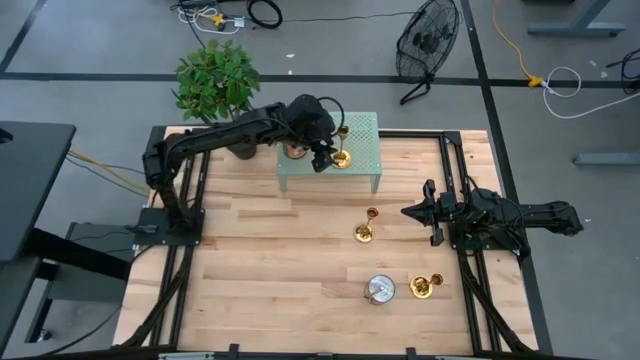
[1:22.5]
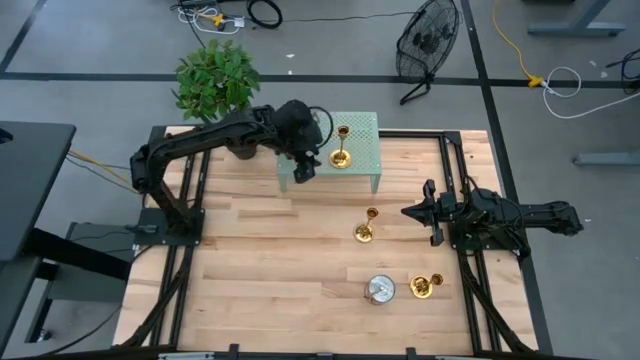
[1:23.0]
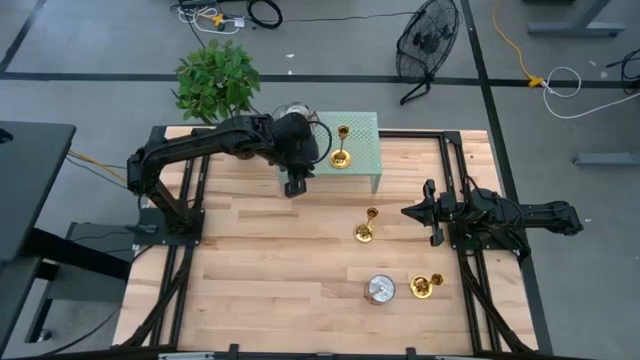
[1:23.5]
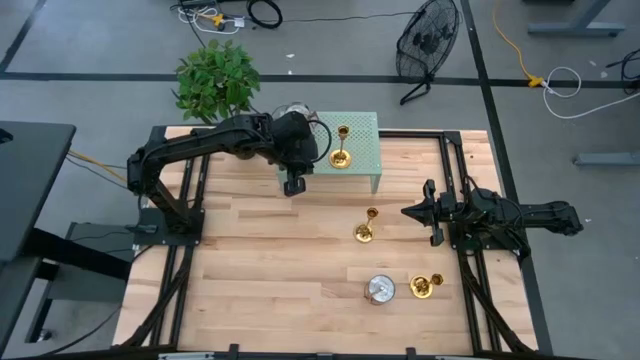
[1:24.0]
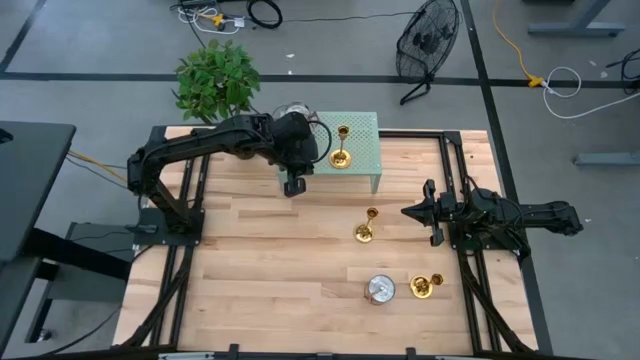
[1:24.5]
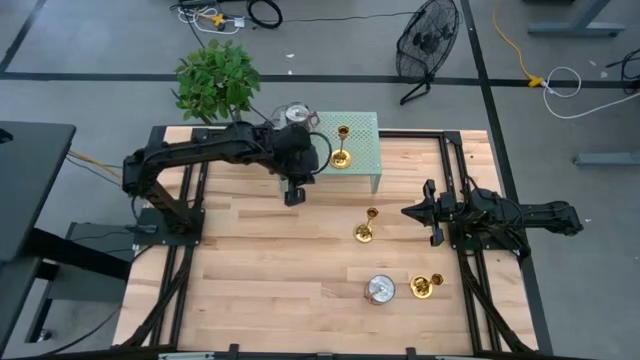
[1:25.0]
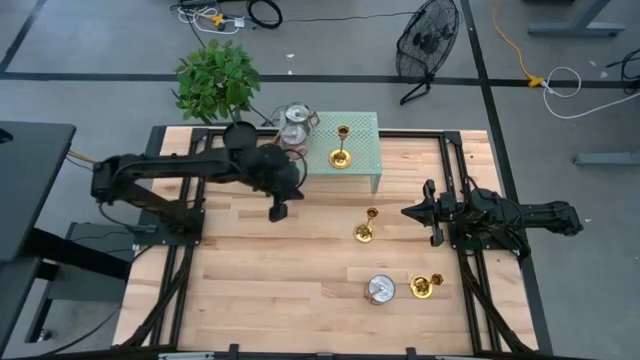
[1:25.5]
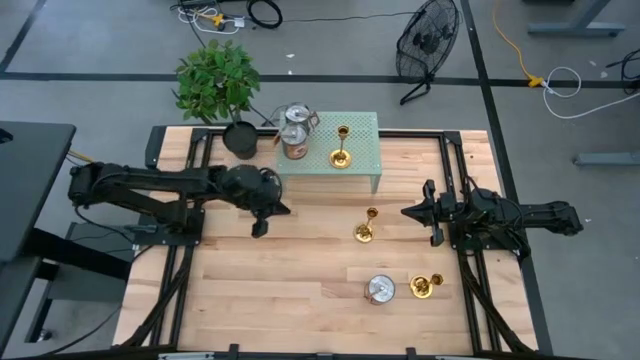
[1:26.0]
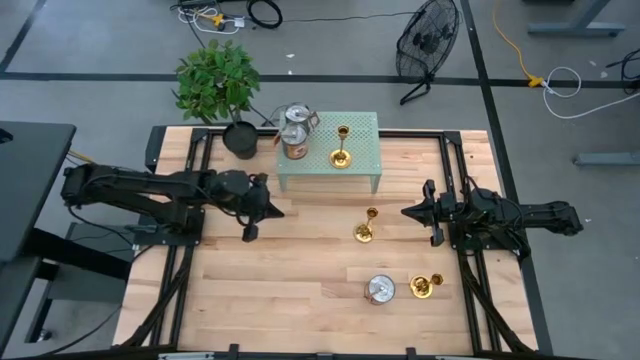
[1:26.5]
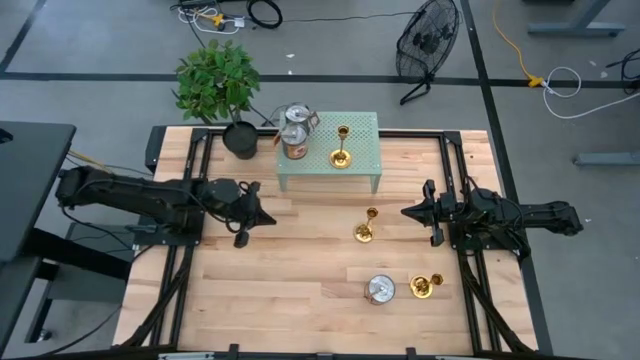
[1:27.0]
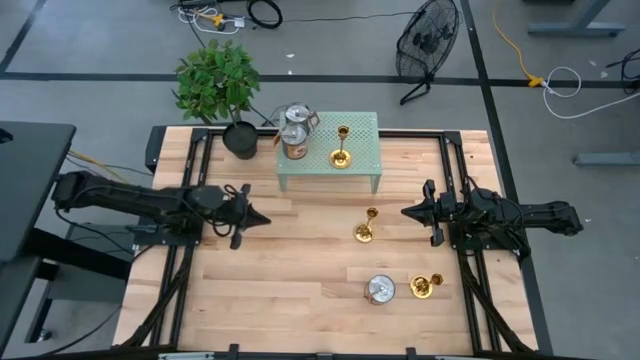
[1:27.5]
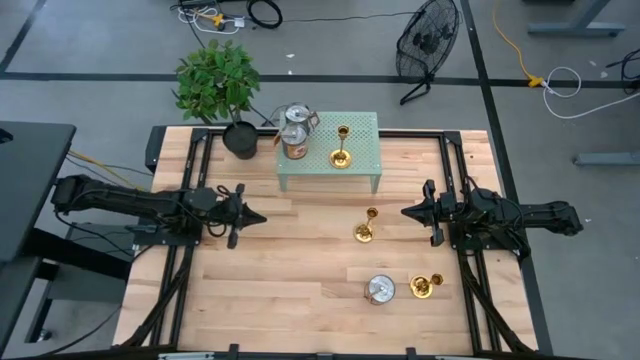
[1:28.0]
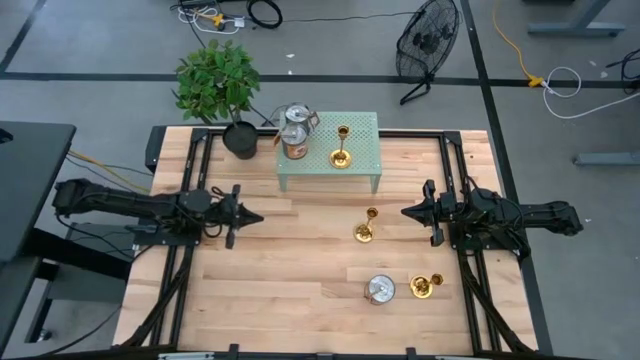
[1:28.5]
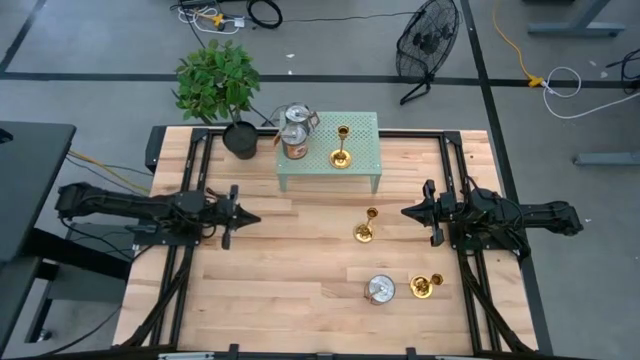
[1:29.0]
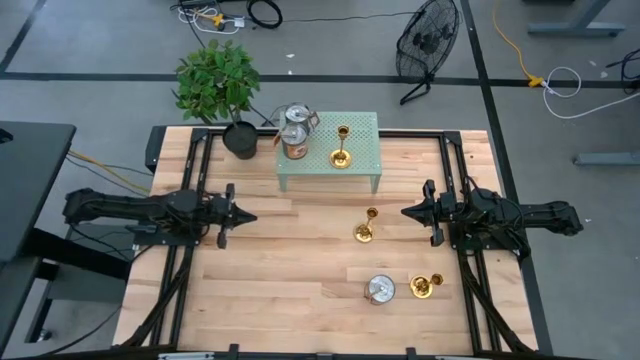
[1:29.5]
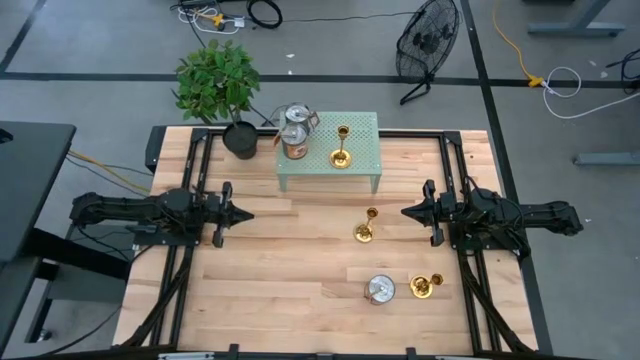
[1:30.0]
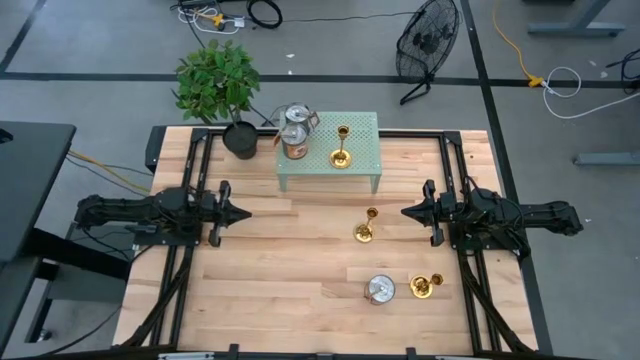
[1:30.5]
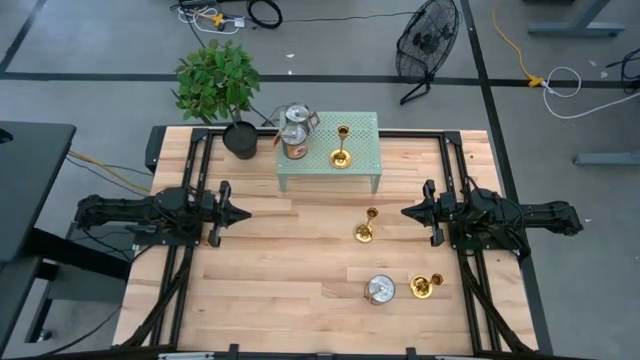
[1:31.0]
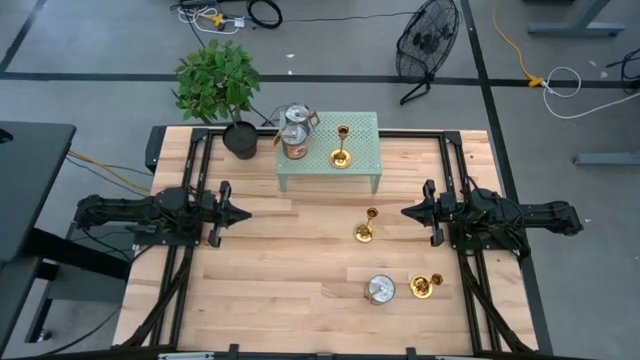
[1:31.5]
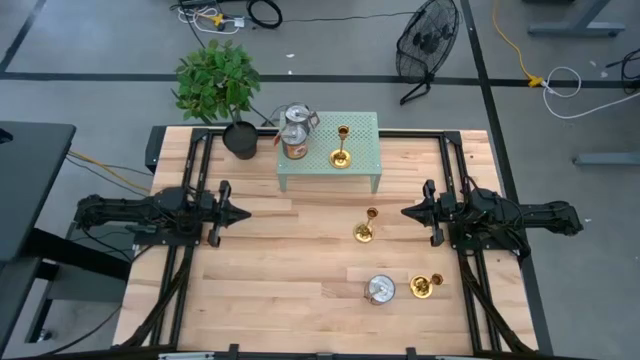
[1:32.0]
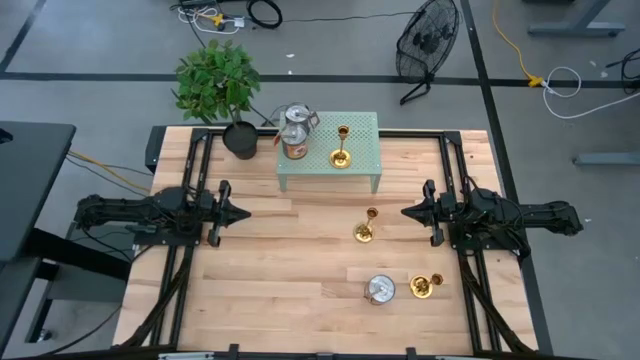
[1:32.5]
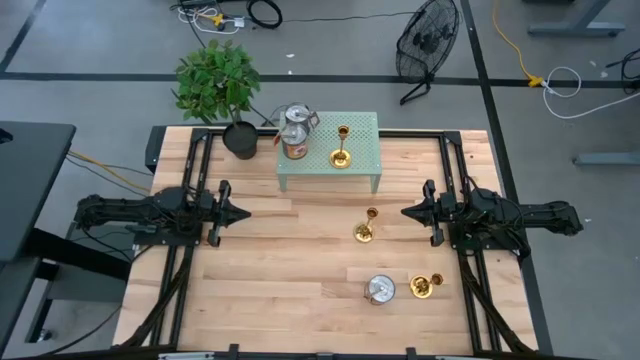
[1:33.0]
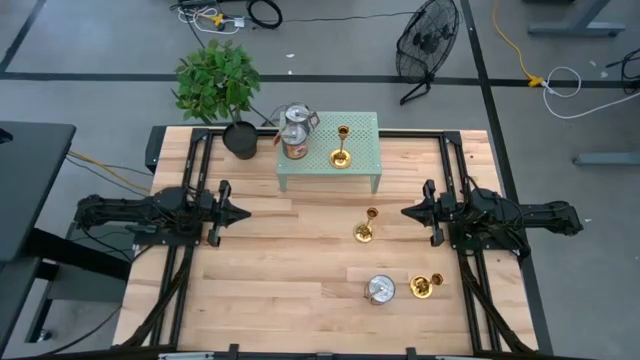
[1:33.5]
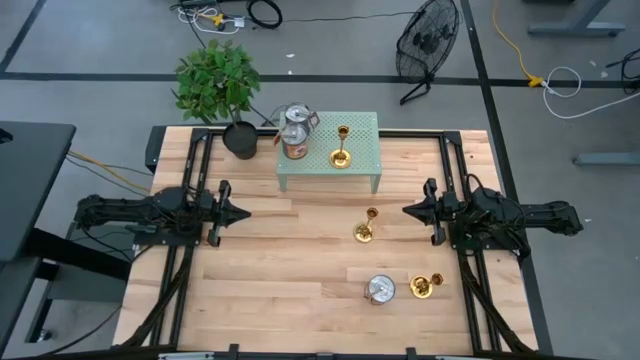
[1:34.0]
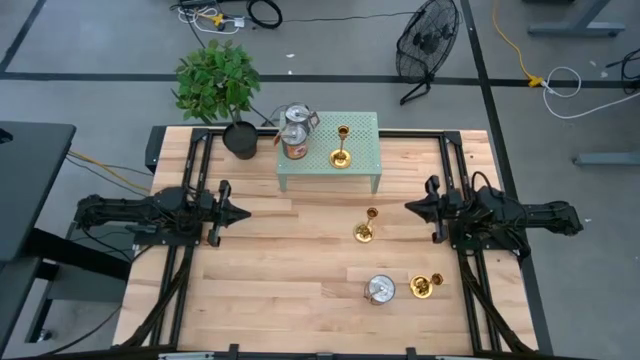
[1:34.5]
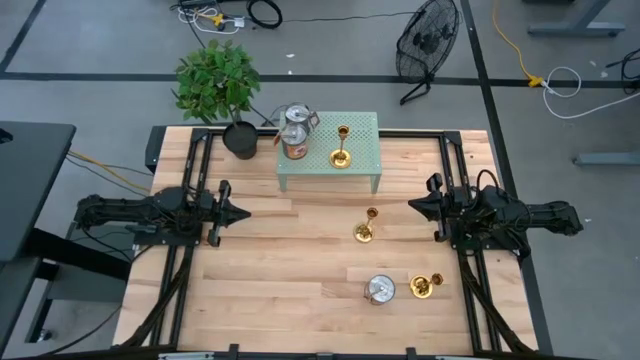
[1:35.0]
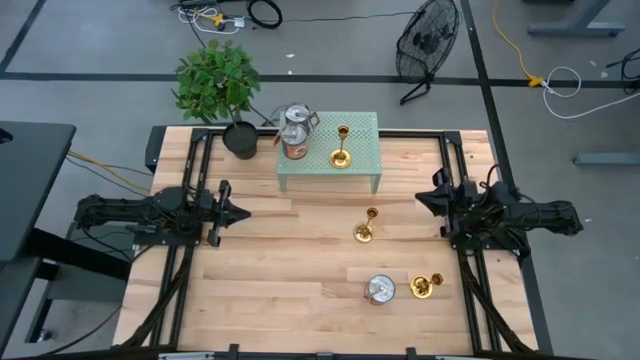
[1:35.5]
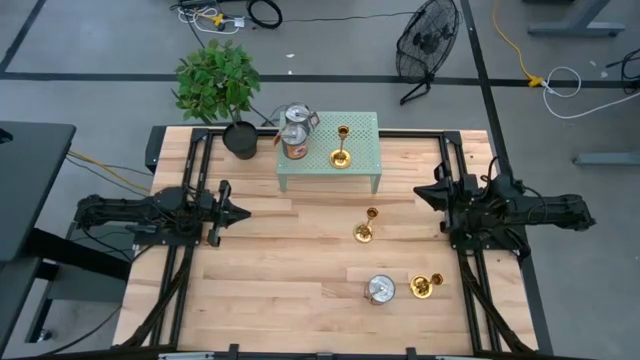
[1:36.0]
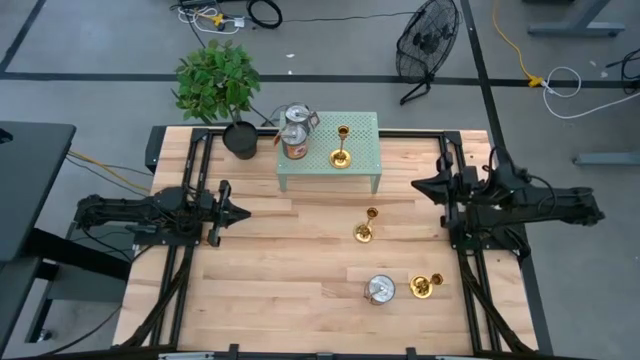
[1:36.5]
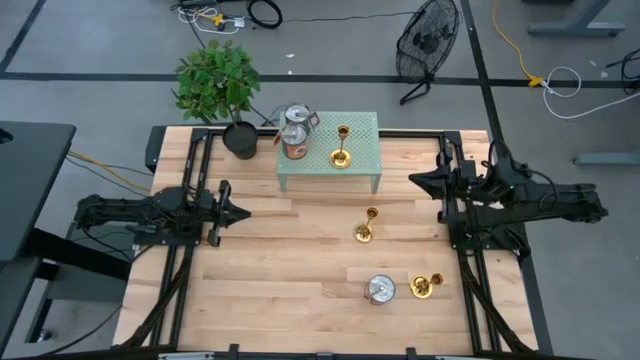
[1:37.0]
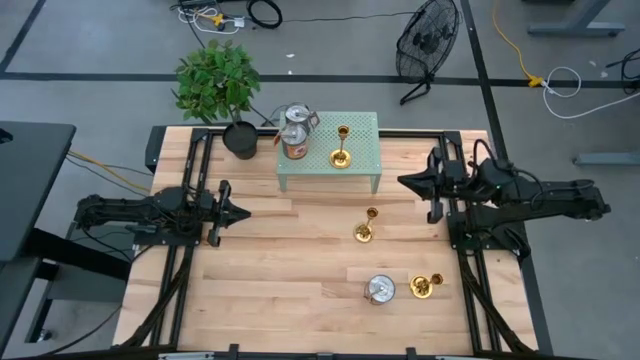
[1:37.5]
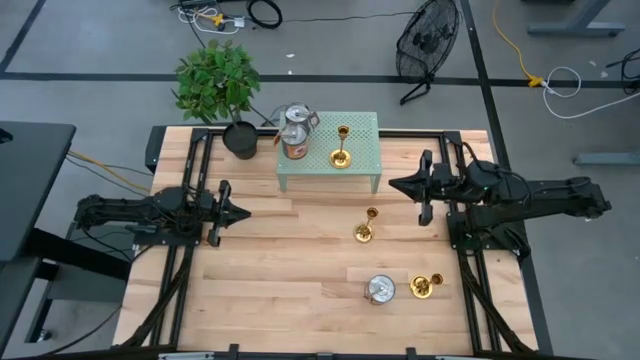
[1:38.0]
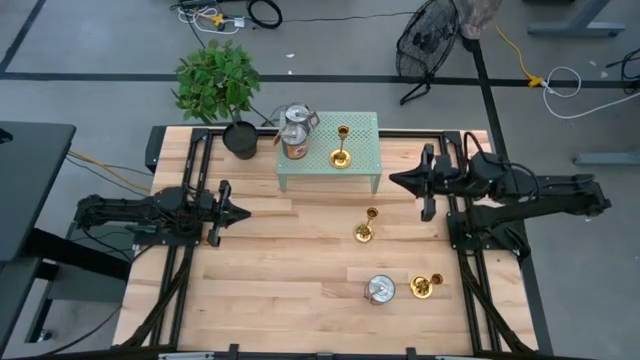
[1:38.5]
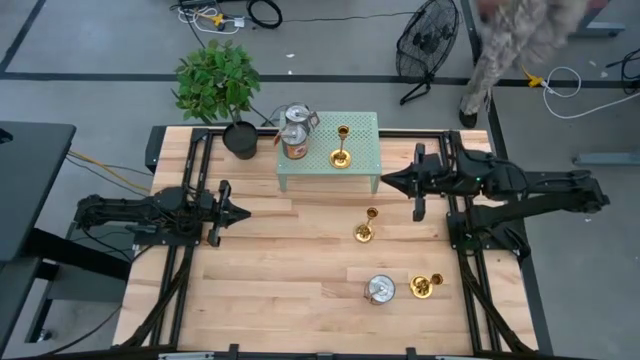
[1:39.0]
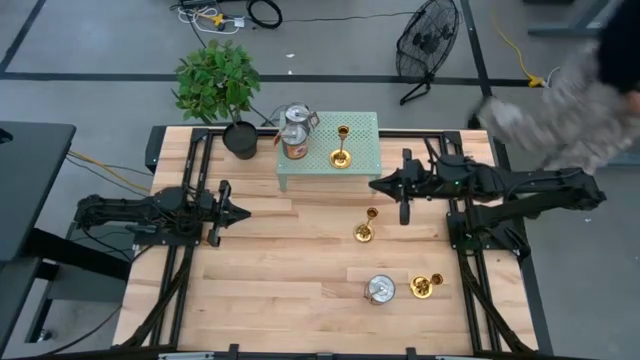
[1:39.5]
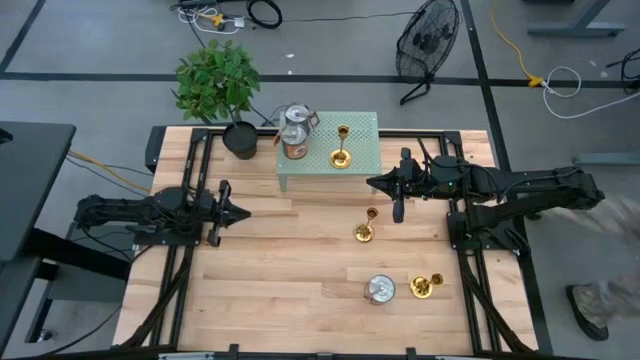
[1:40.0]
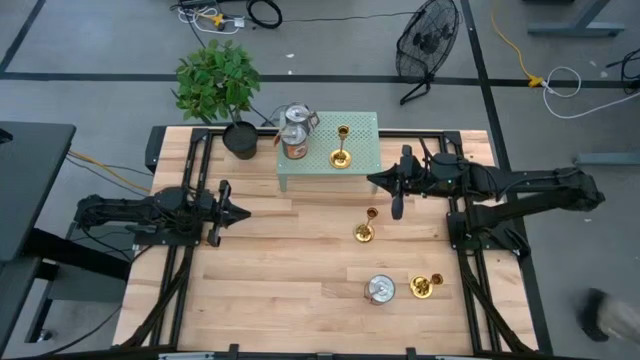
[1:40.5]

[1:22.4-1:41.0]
Task: Pick & Place candle stick holders
Put the top left gold candle holder on the shelf

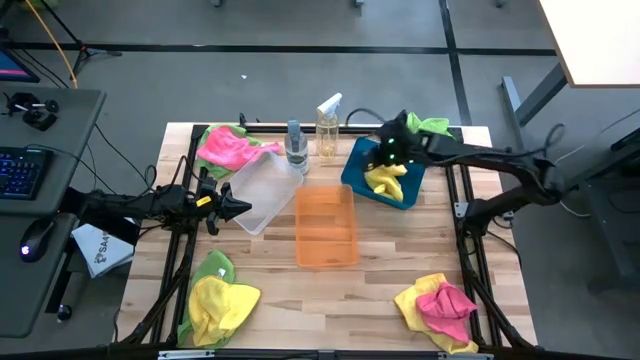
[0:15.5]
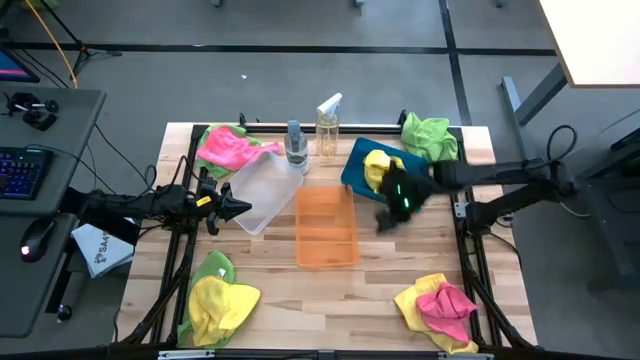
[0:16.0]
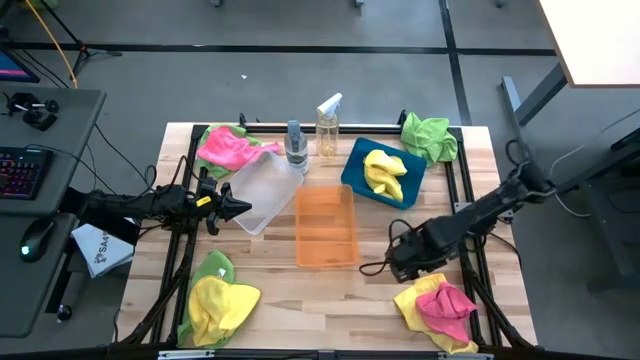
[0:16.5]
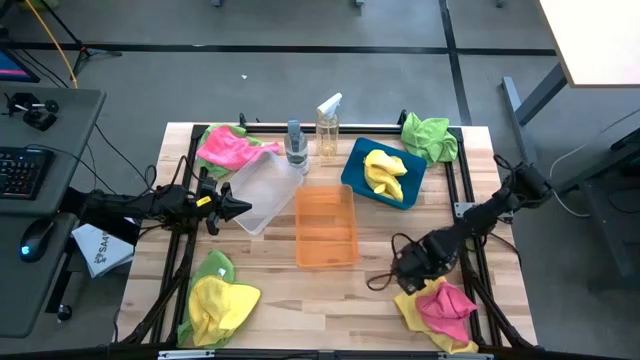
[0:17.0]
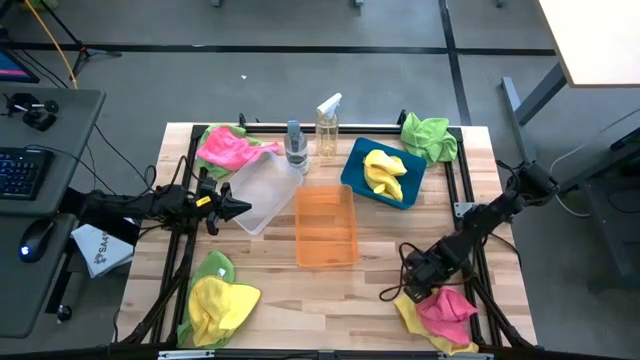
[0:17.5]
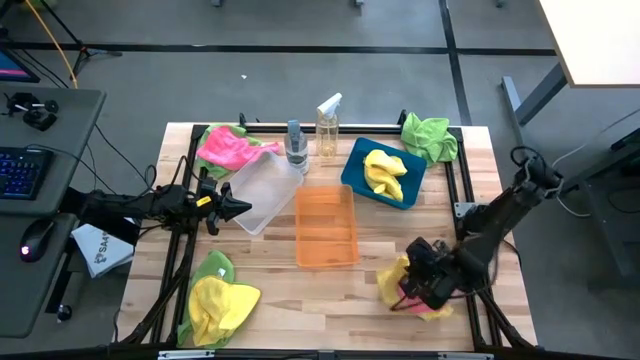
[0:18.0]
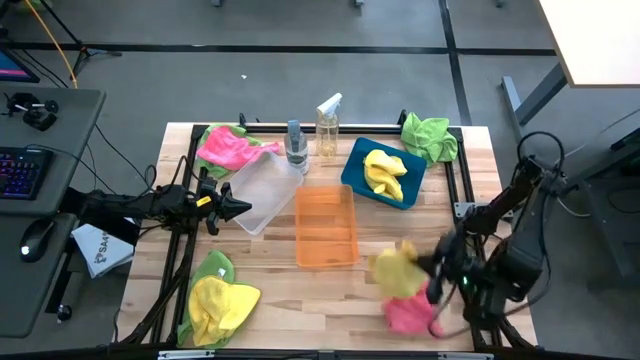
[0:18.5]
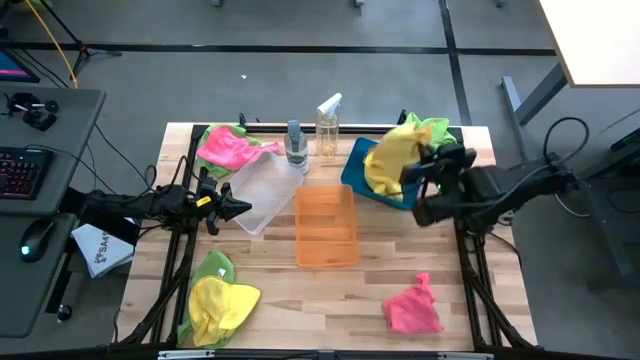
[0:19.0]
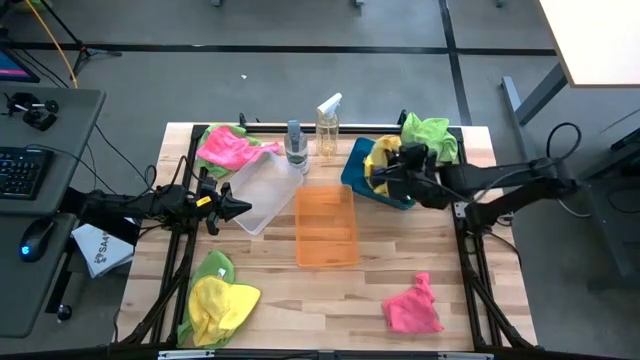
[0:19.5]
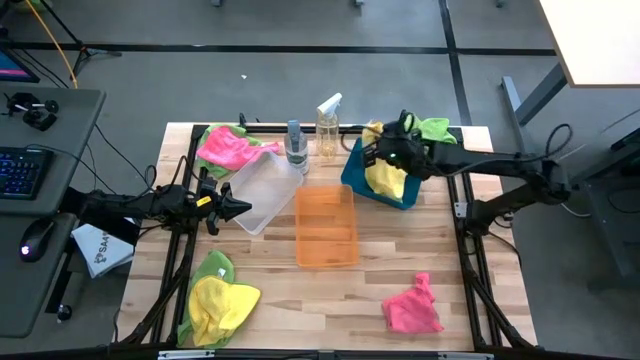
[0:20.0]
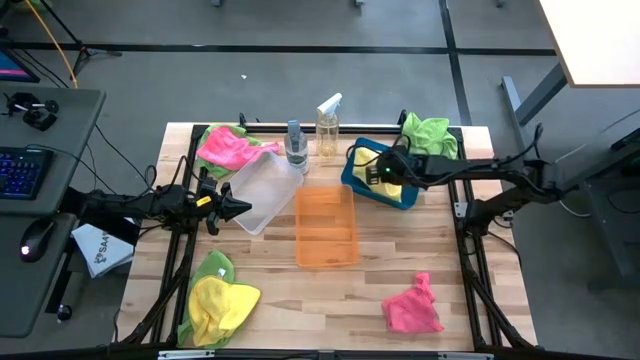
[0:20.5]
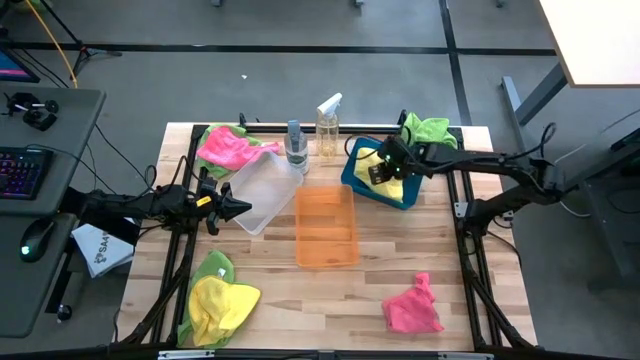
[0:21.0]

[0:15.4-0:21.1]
Task: Sort microfiber towel by color & place in baskets
Put the right yellow microfiber towel into the blue bin
